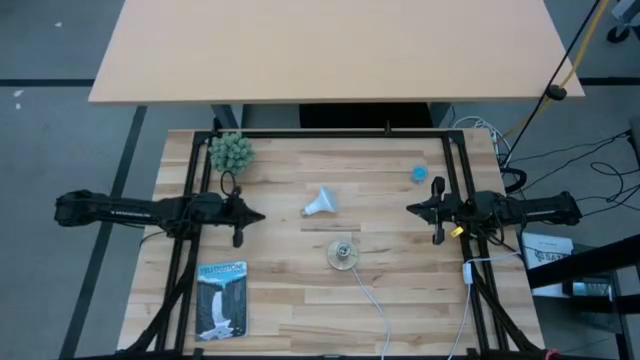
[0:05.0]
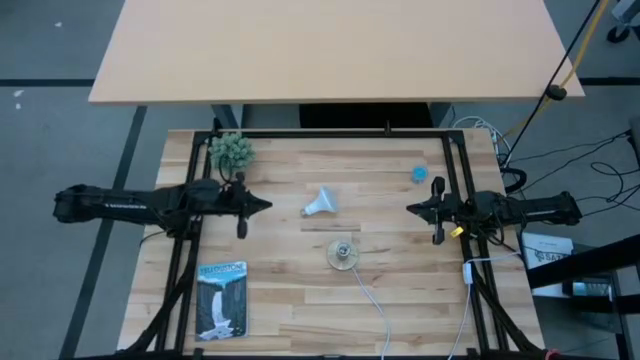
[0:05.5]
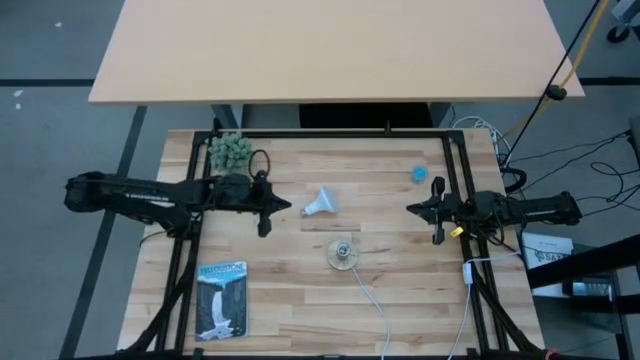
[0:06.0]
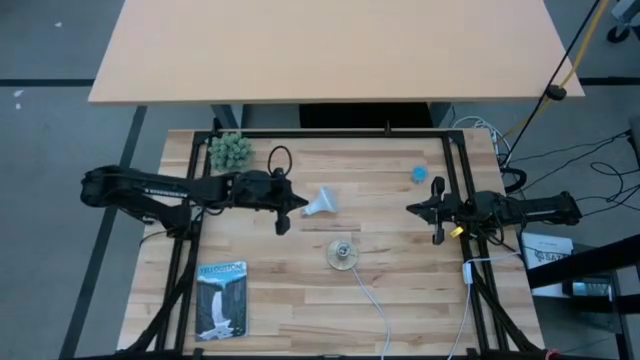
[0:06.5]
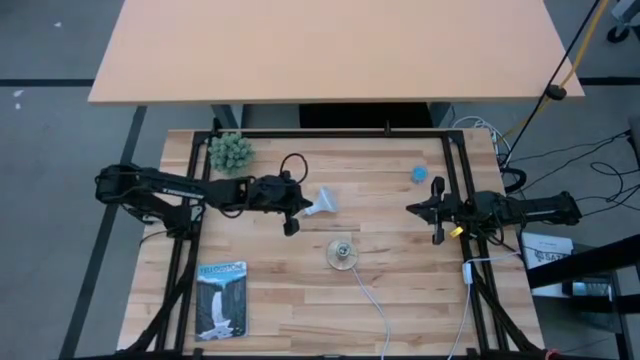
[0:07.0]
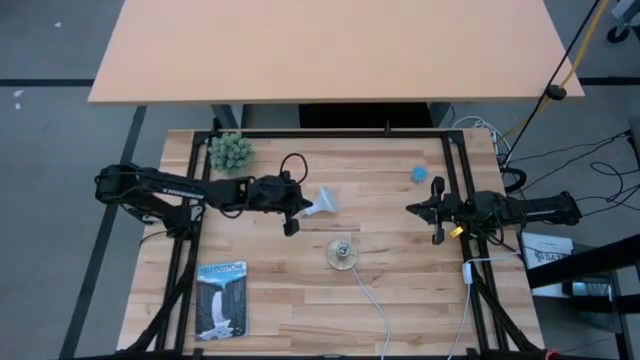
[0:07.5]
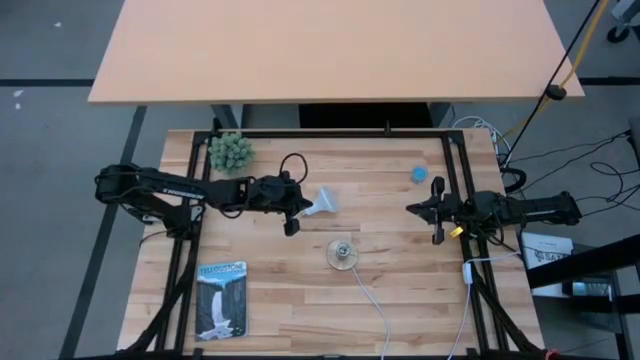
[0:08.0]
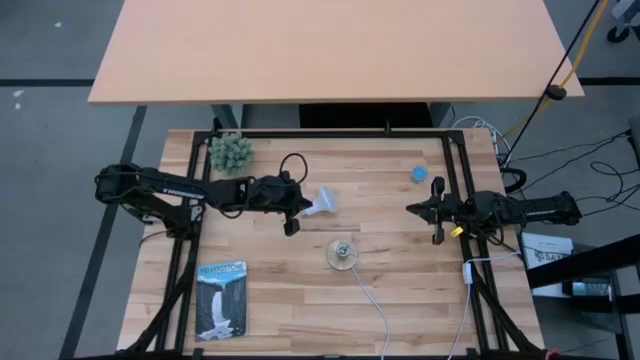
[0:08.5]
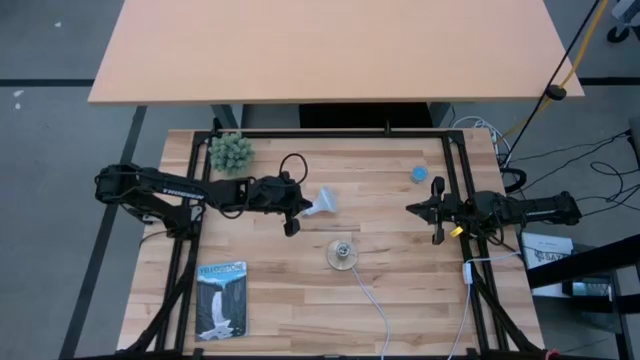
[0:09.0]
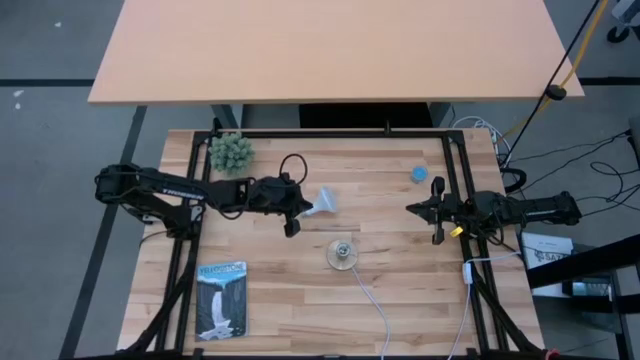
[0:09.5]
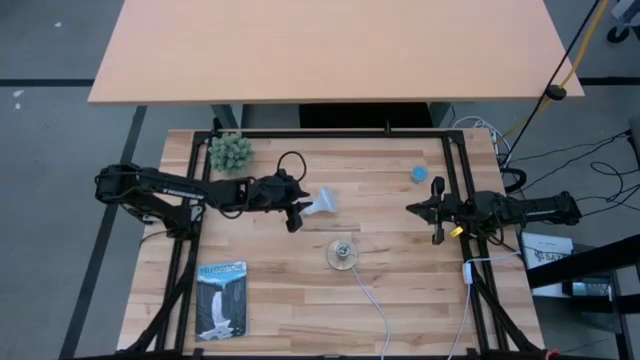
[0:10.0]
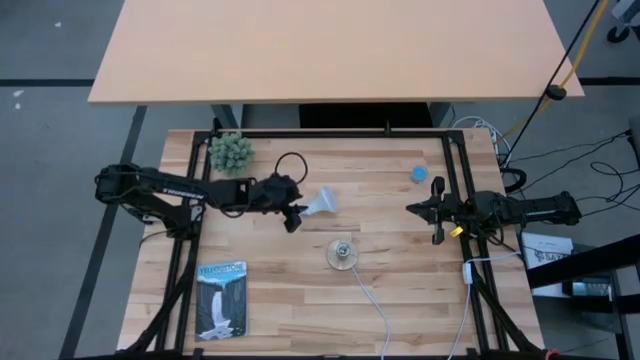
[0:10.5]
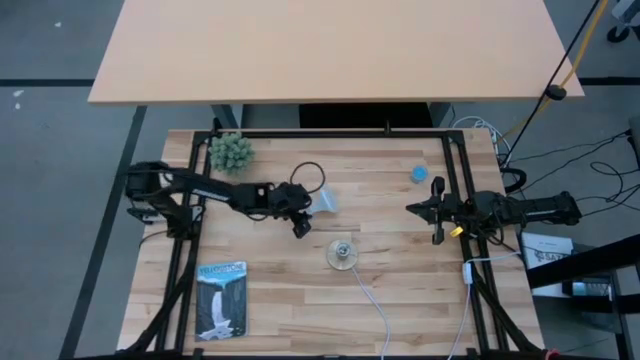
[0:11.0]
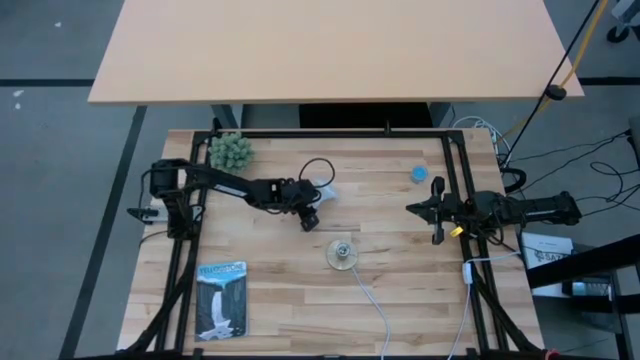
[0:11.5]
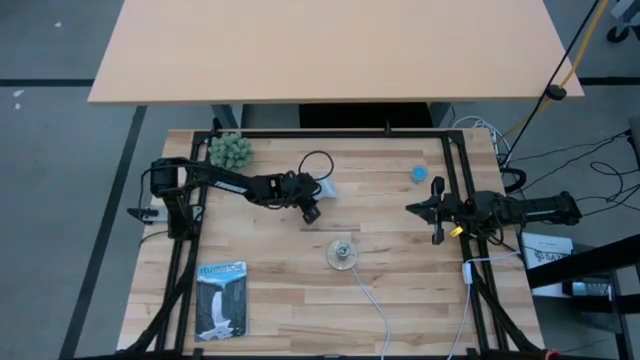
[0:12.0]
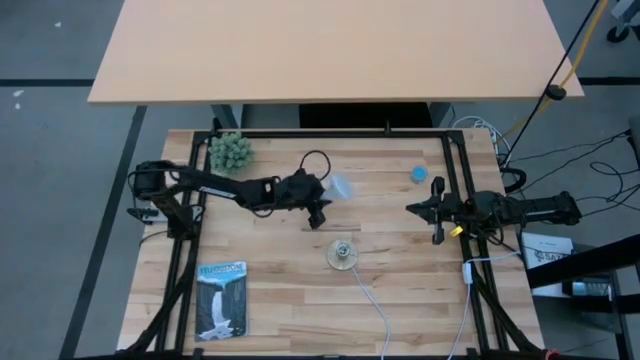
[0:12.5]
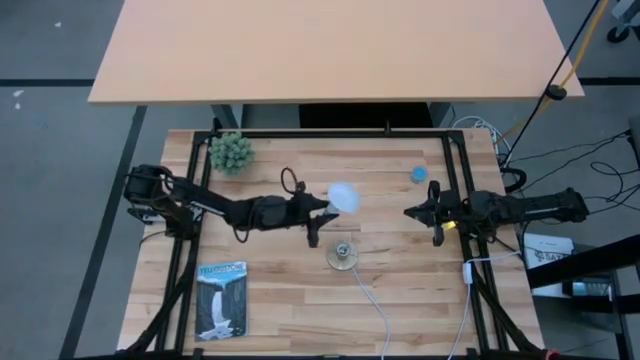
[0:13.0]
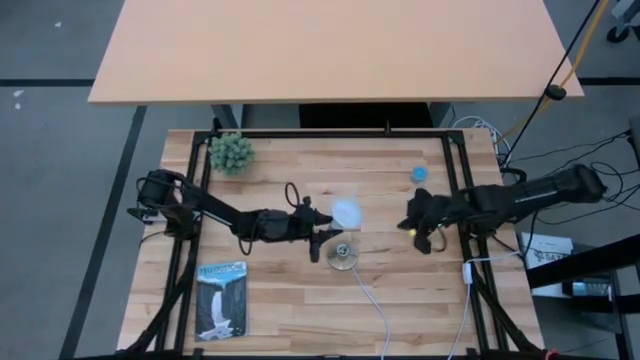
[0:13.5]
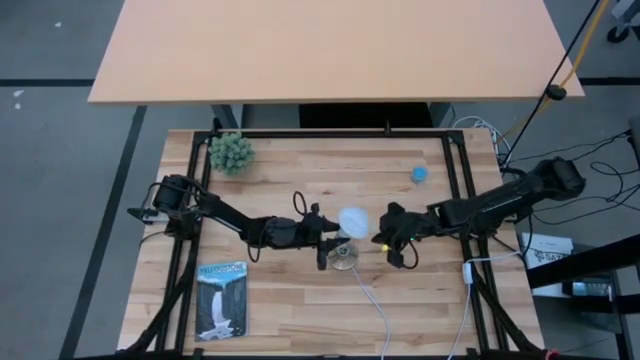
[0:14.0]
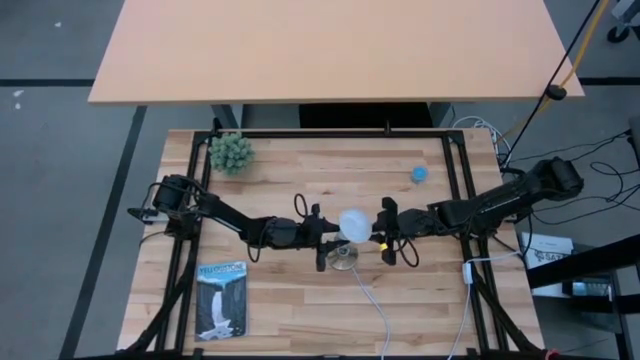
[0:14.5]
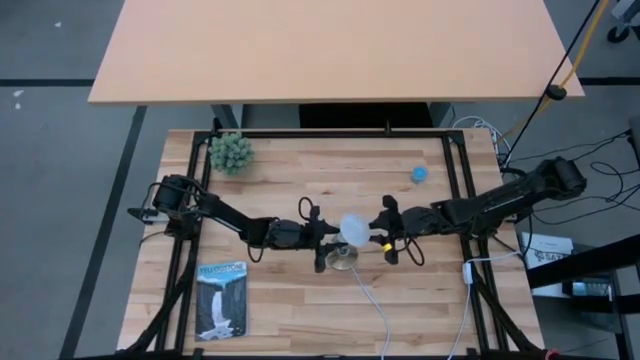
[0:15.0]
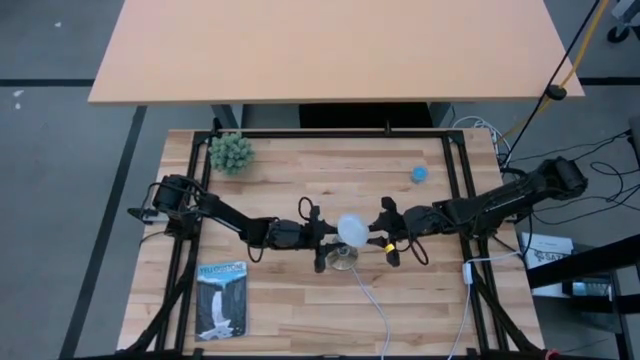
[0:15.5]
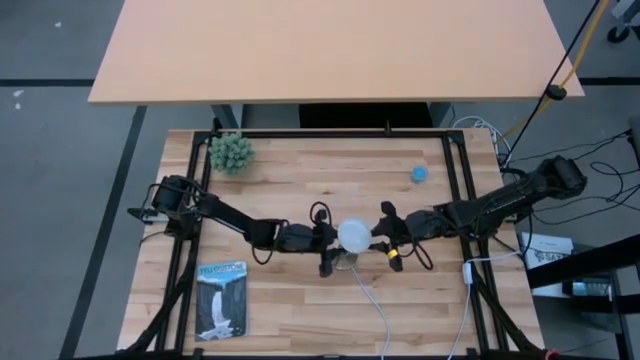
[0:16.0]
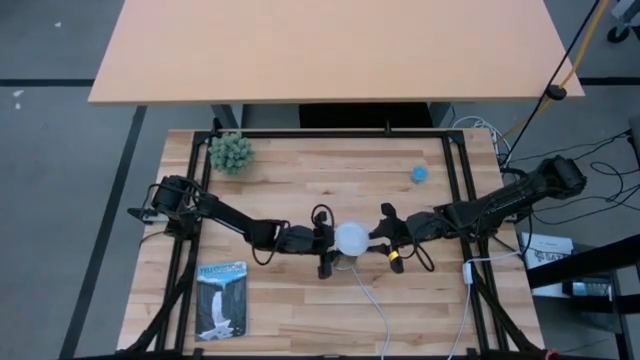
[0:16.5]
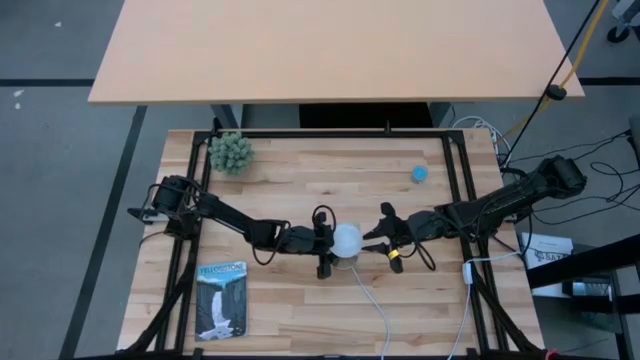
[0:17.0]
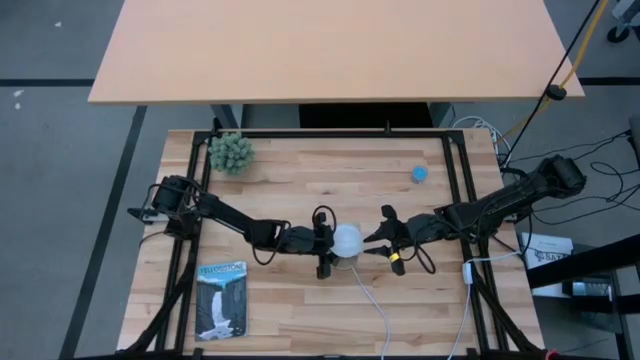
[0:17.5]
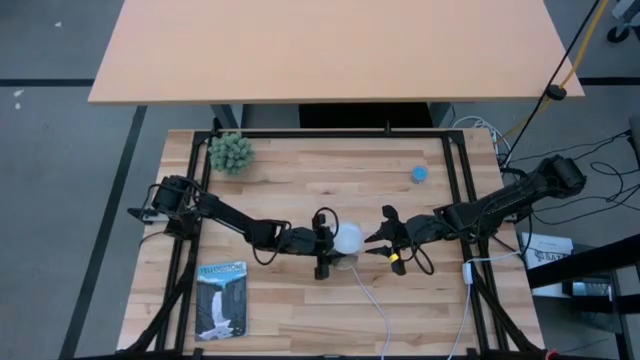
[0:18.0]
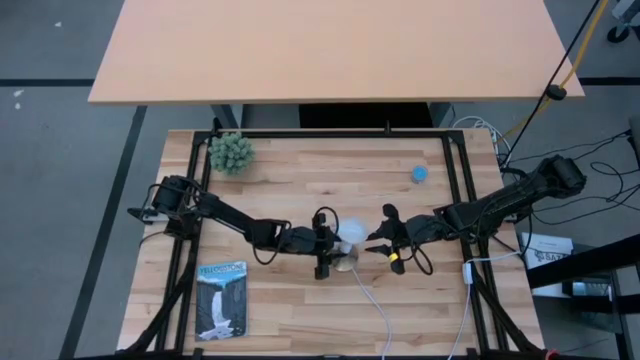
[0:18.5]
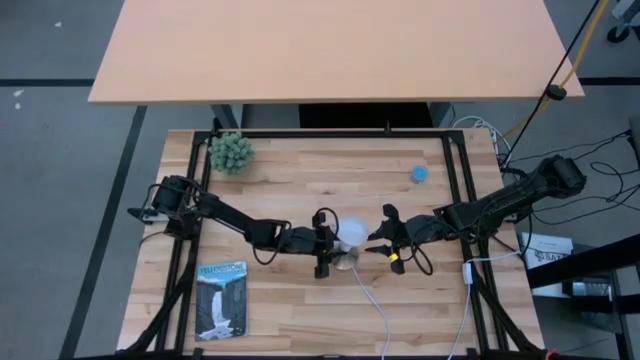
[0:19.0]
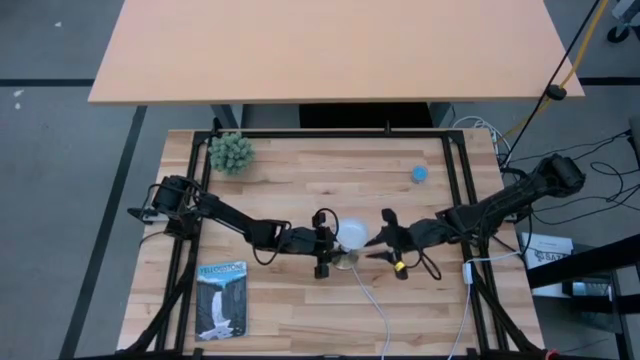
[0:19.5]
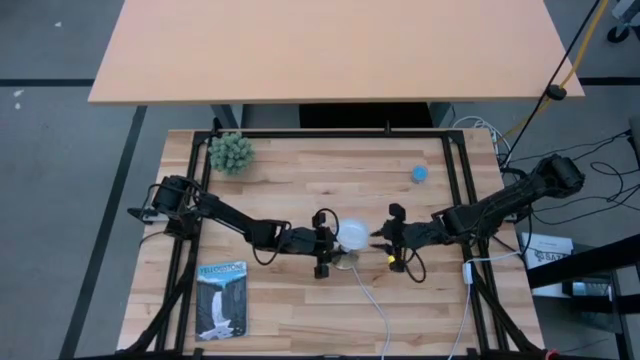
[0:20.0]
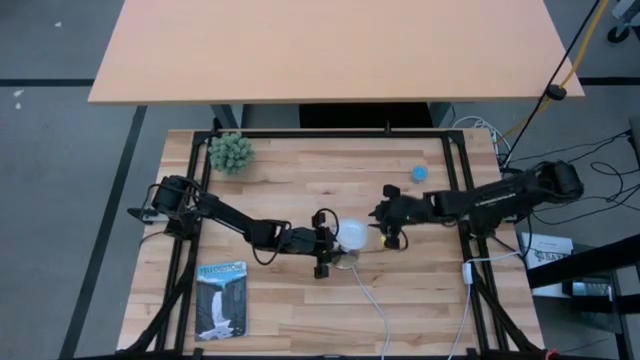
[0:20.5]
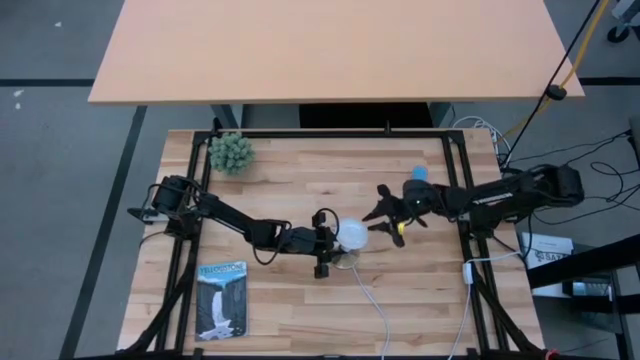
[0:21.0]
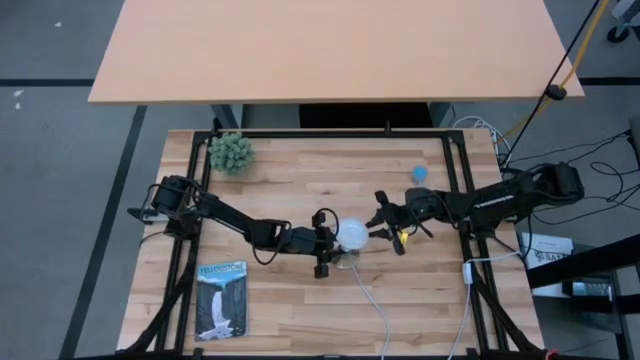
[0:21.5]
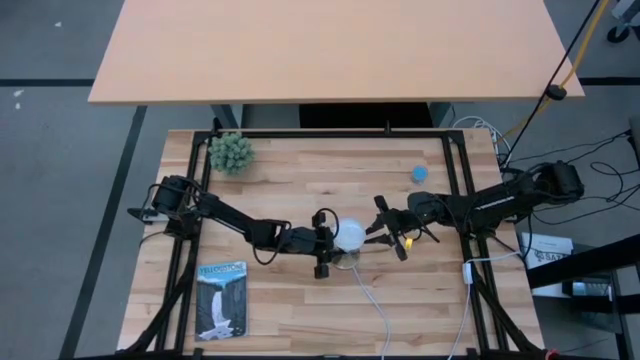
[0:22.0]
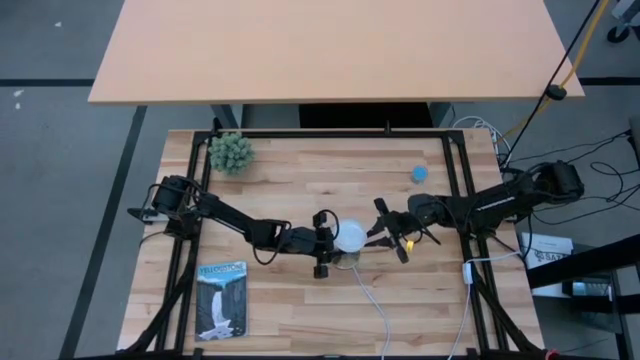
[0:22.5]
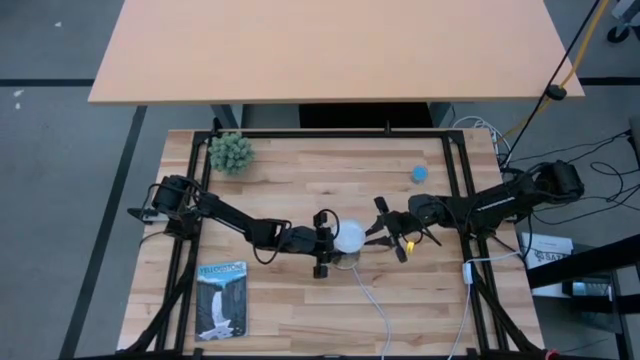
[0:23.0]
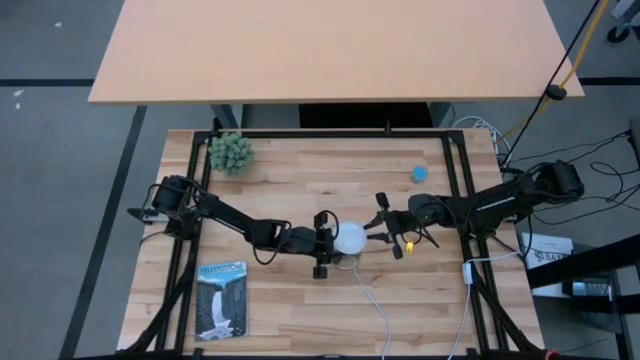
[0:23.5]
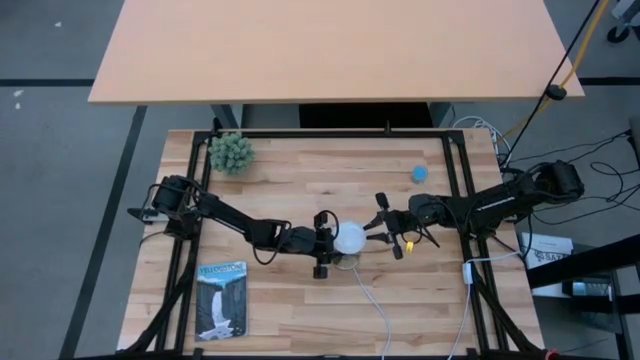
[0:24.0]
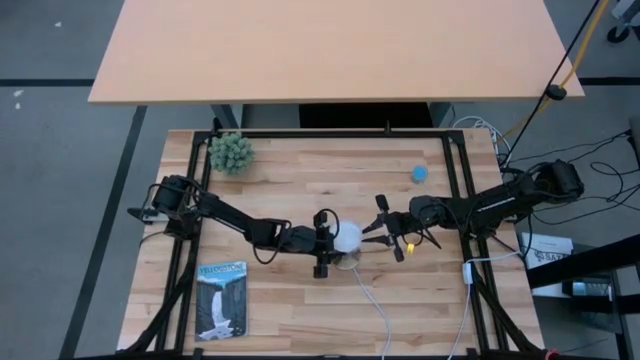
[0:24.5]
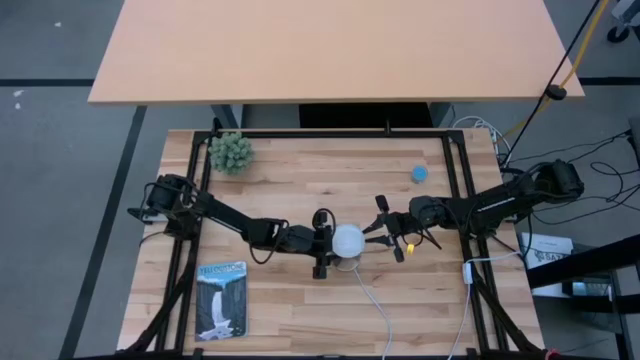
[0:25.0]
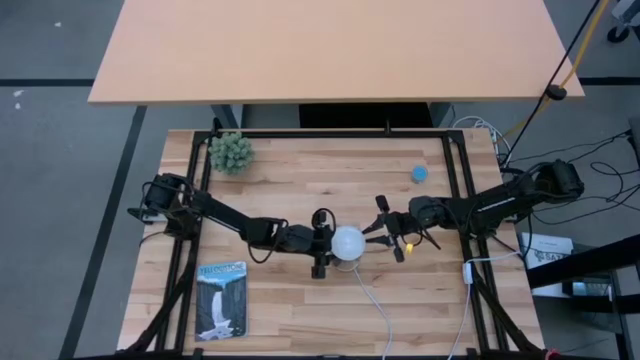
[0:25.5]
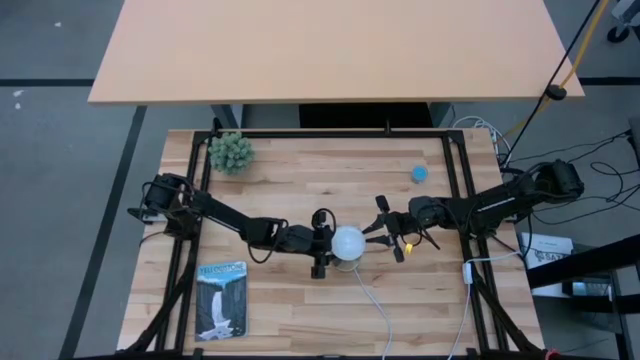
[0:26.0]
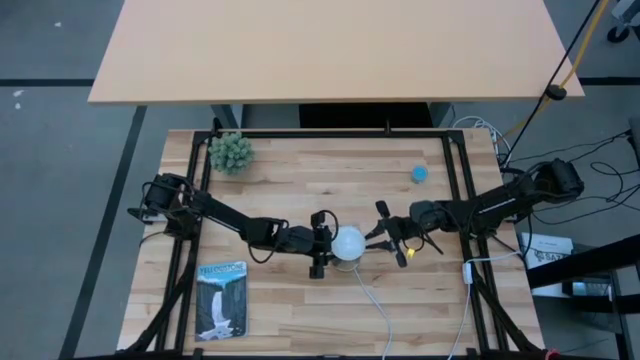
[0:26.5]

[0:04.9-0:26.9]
Task: Screw lightbulb
Insert the lightbulb into the desk lamp
